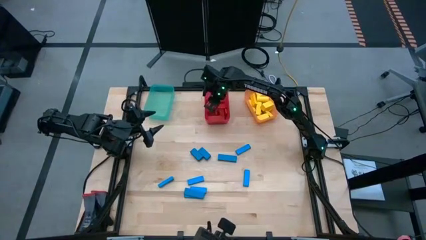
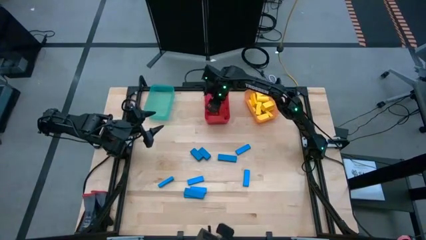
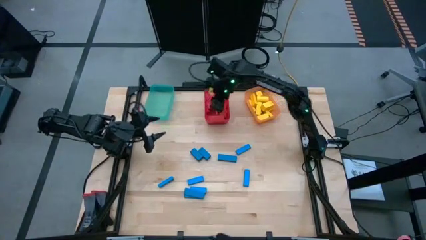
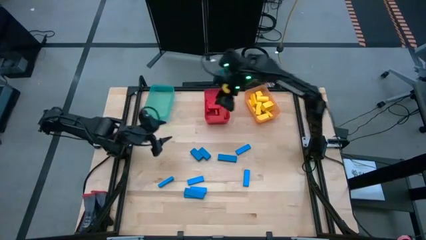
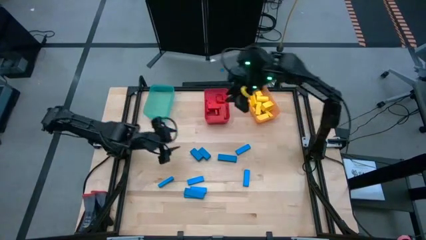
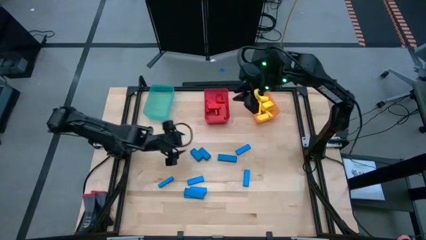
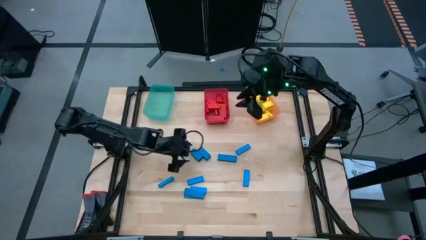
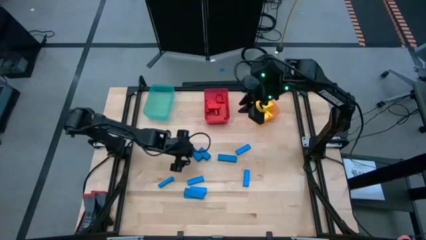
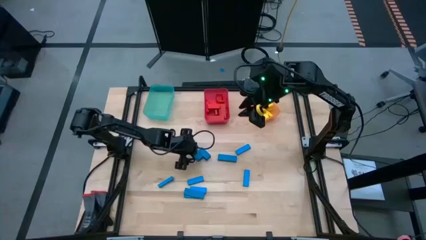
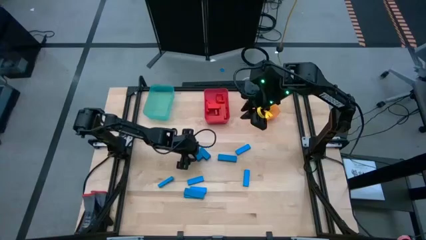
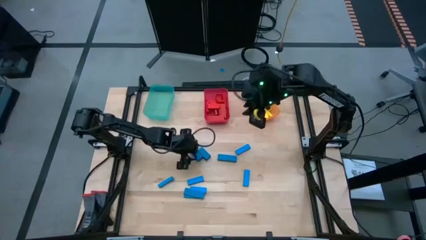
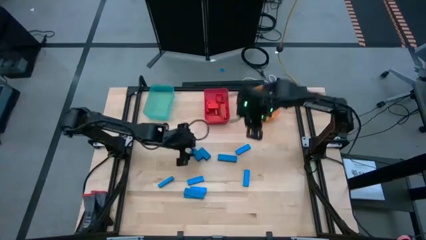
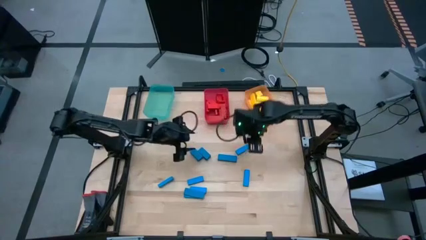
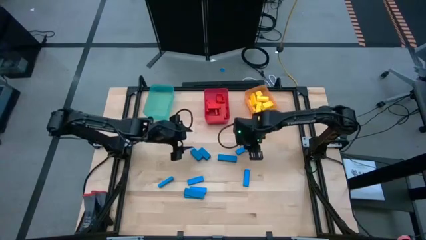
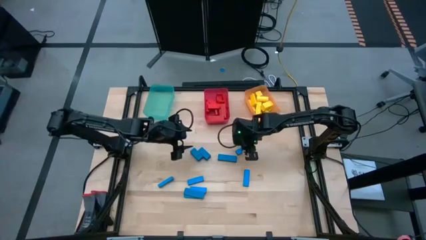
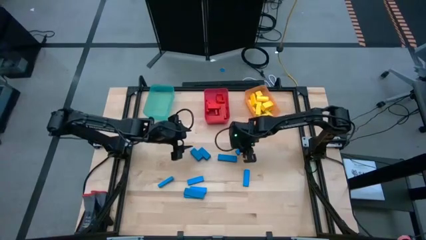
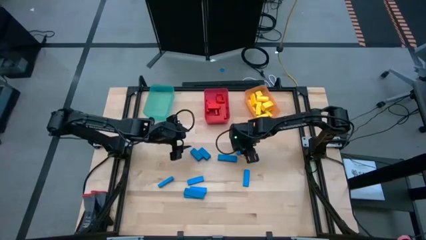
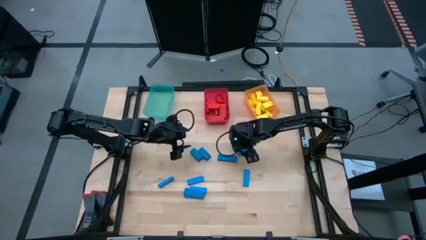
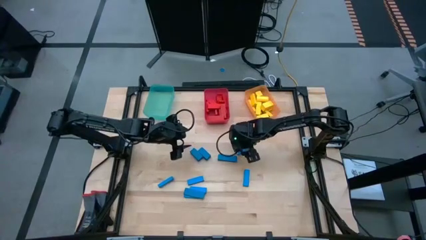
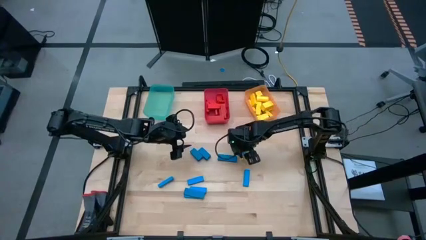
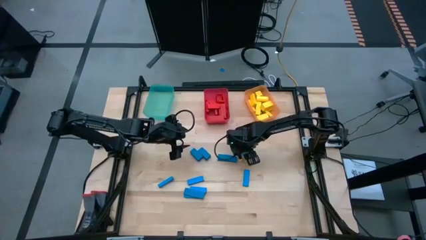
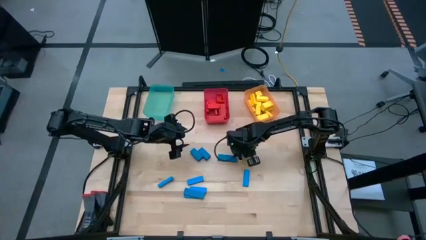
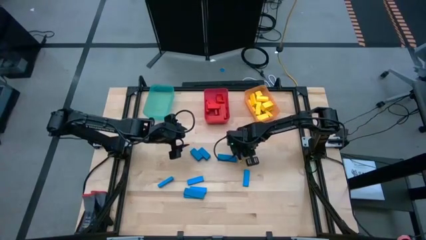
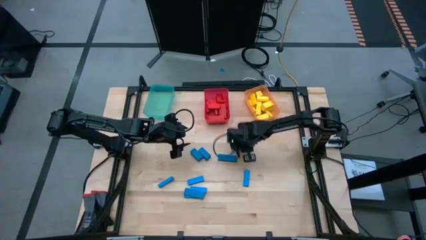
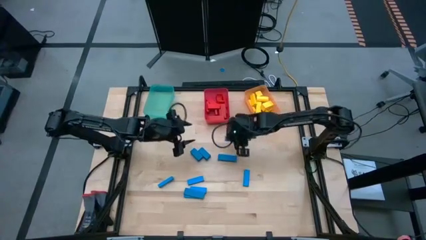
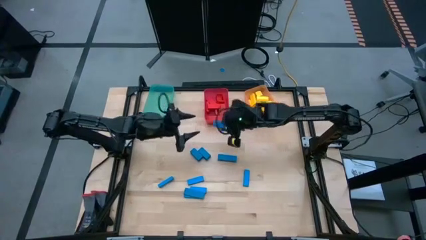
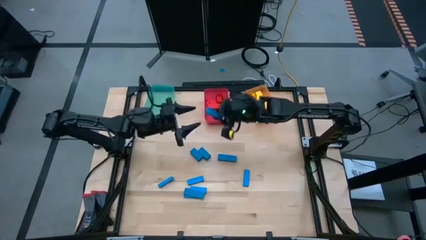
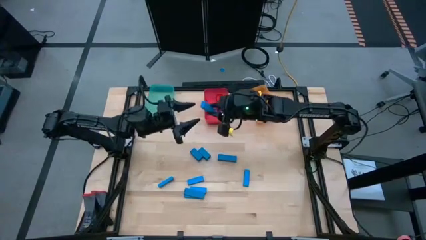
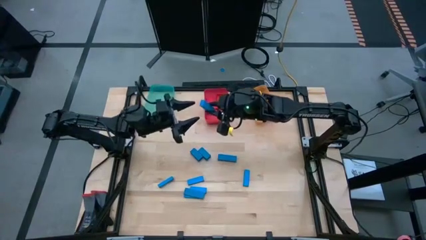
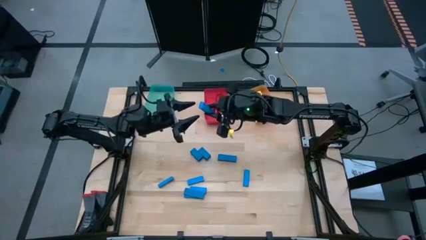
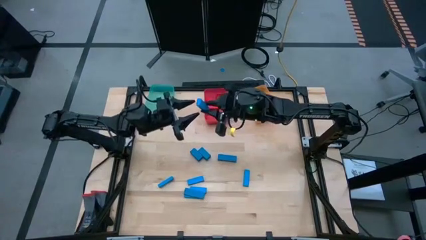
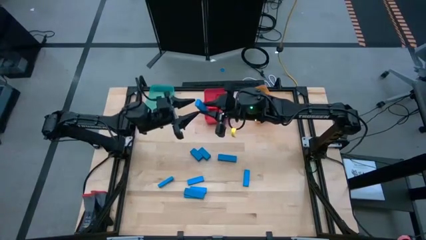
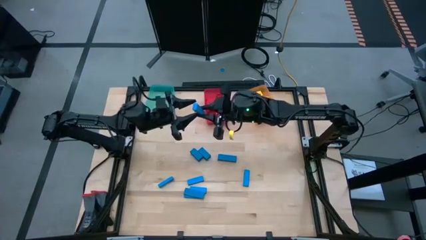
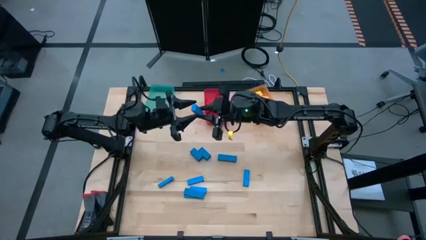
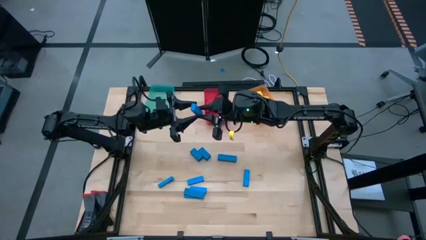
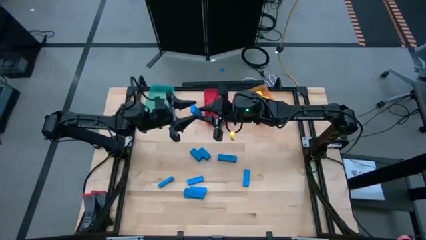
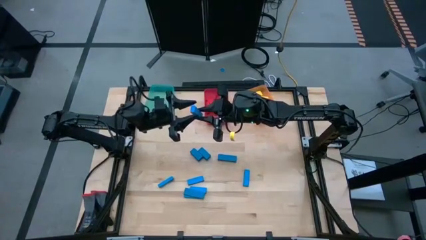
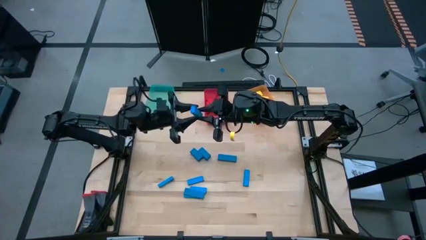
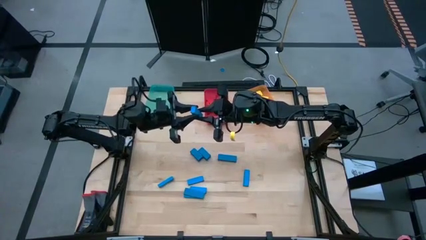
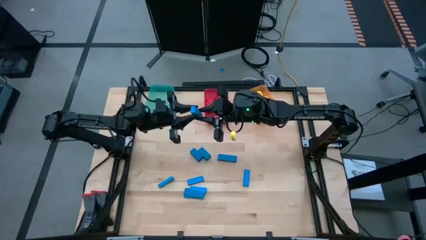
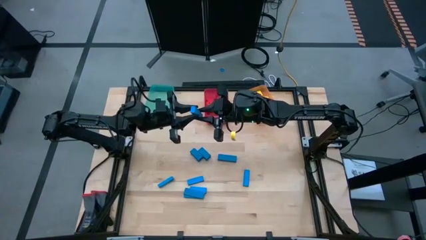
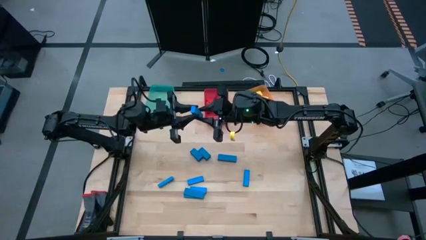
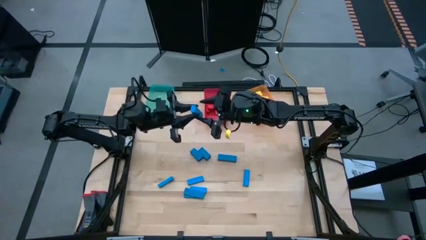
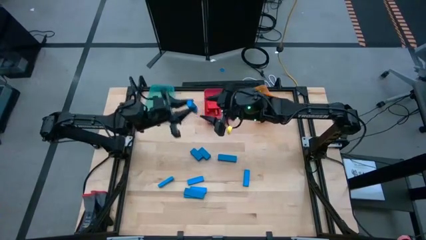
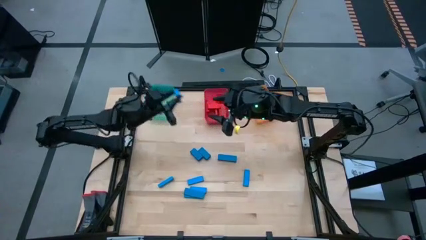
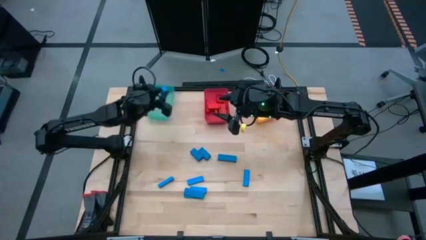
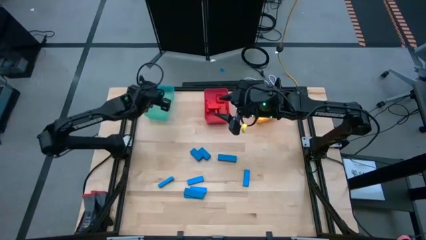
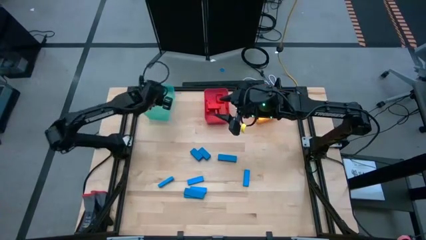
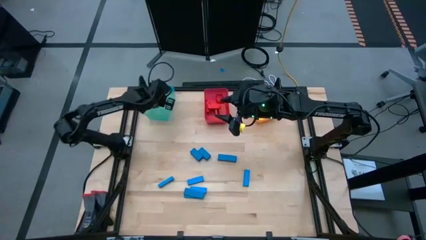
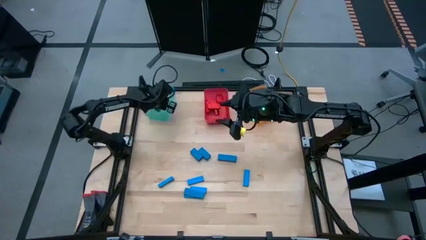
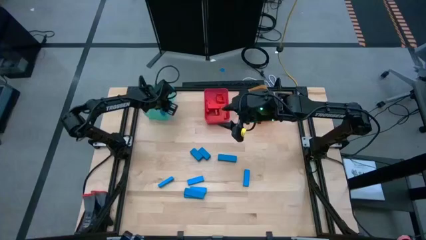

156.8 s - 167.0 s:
Task: Sort blocks
Put the blue block into the blue bin

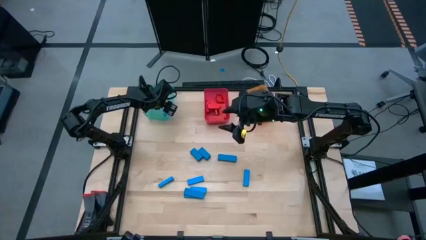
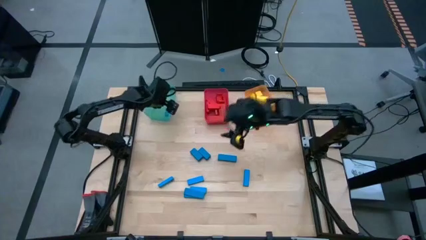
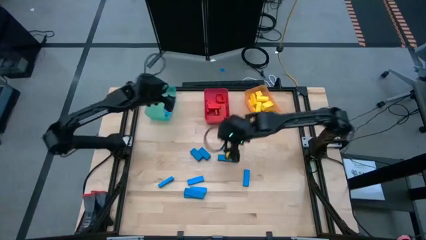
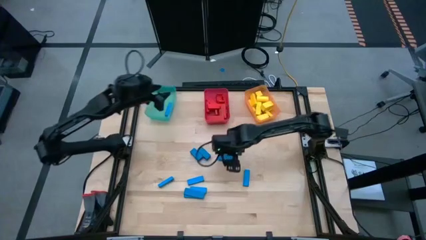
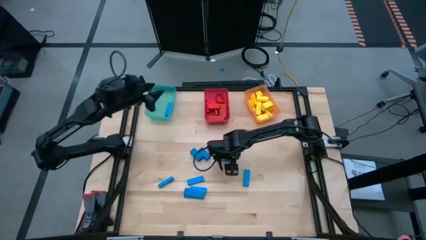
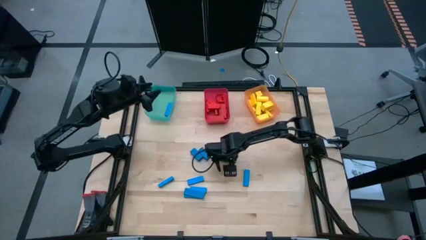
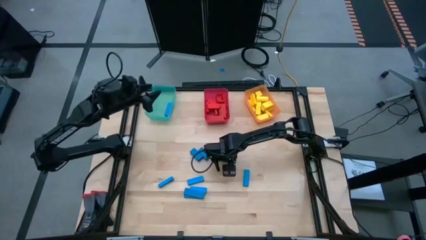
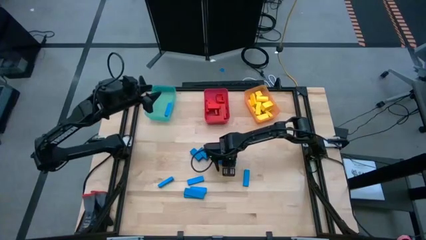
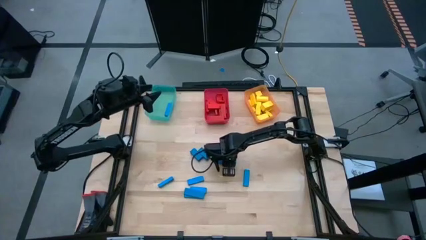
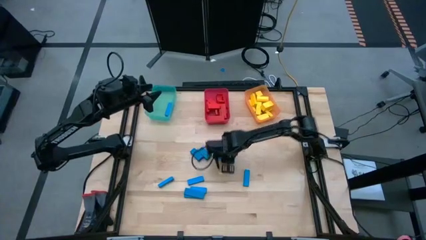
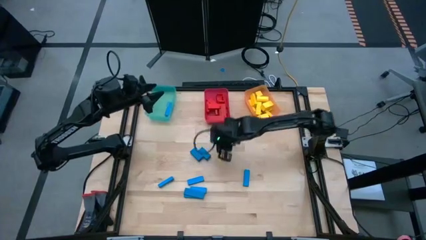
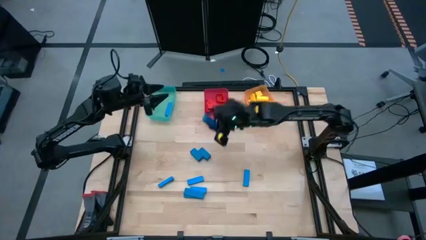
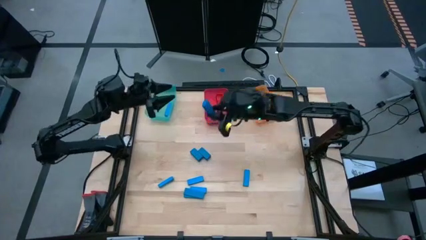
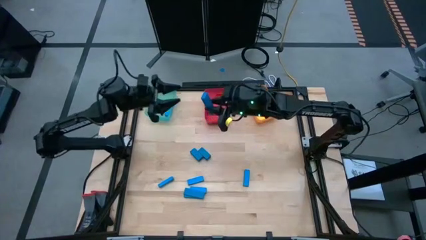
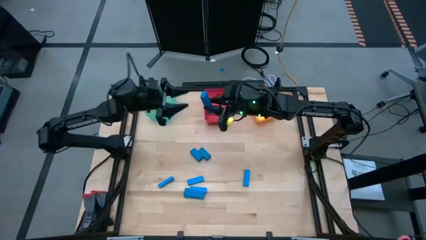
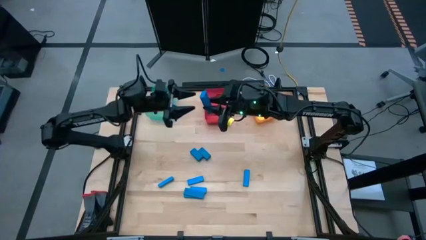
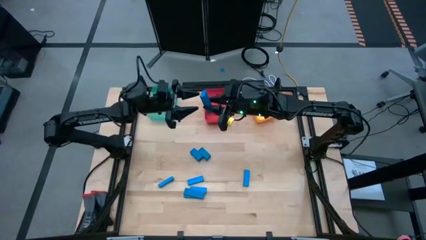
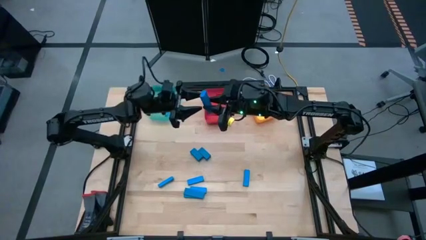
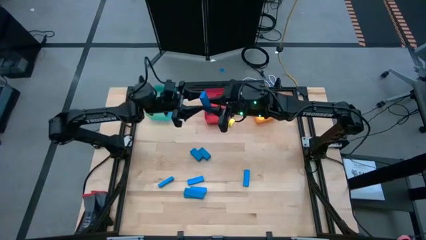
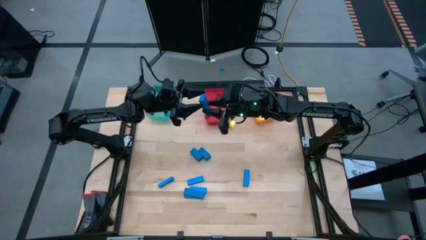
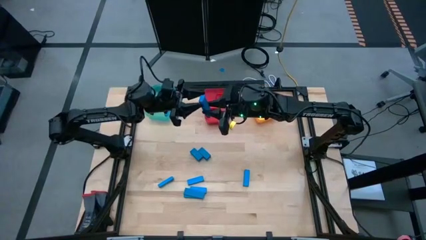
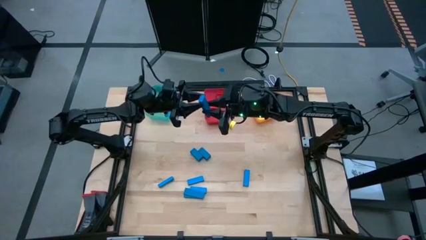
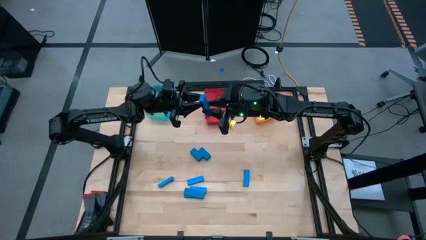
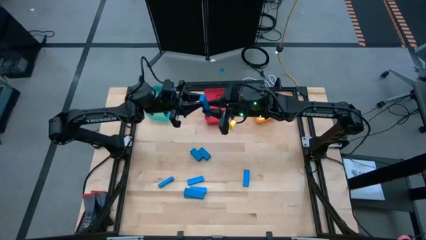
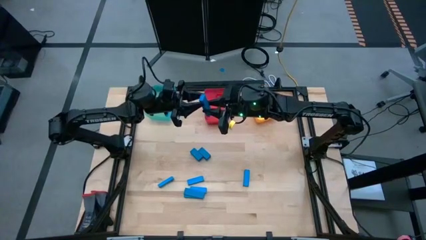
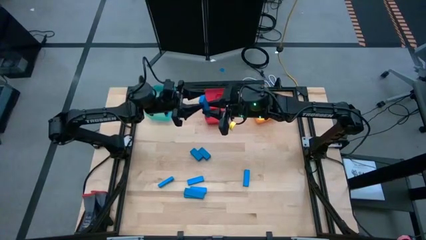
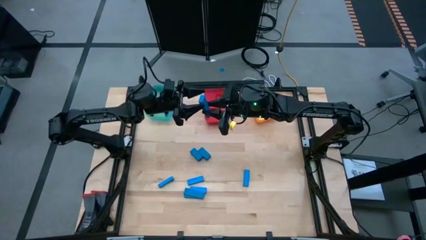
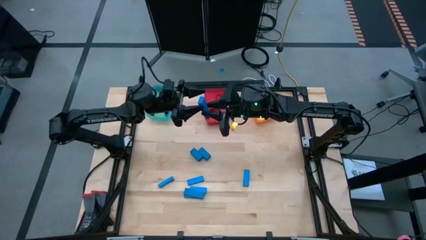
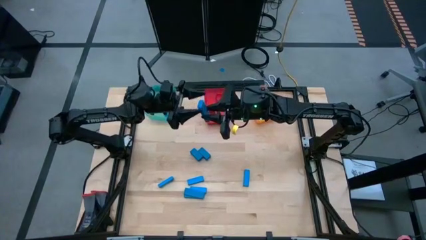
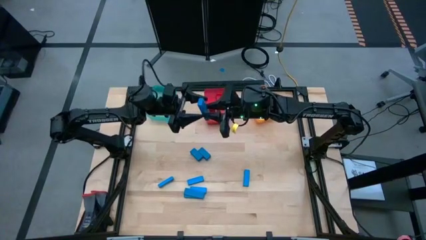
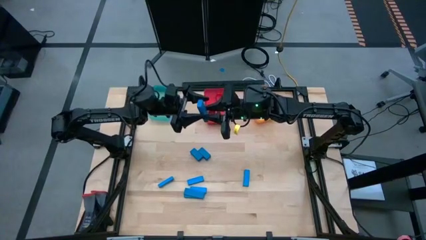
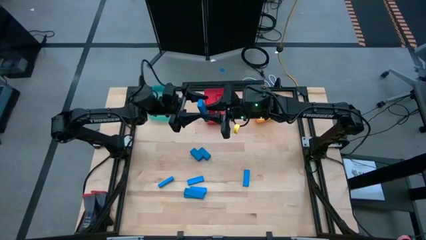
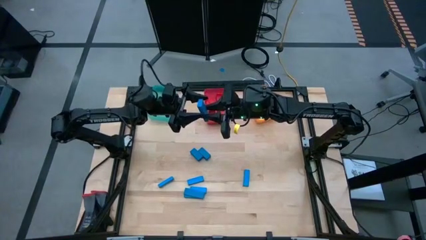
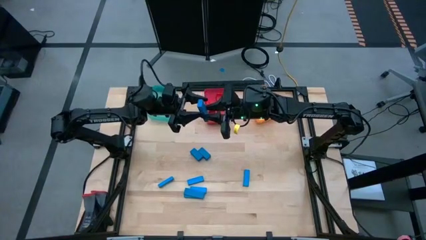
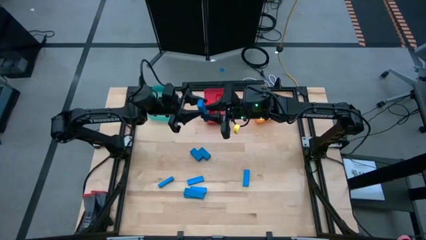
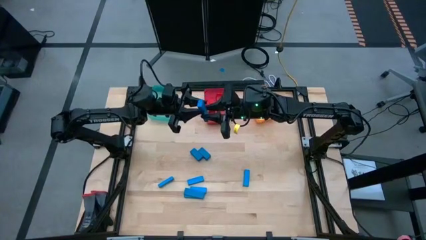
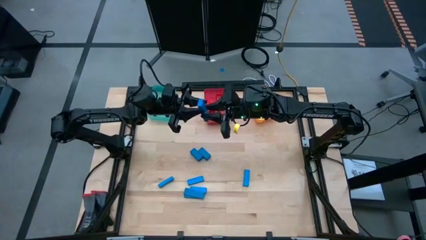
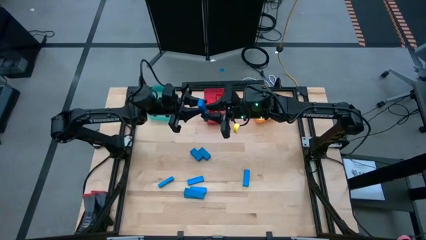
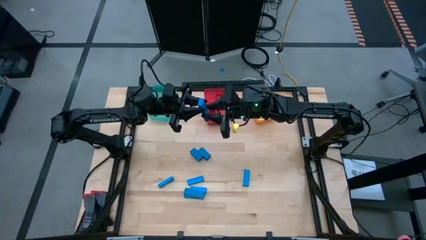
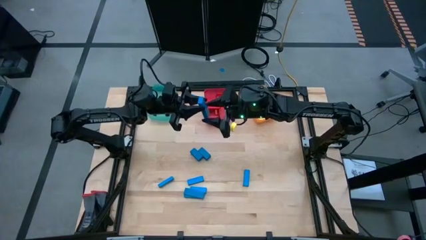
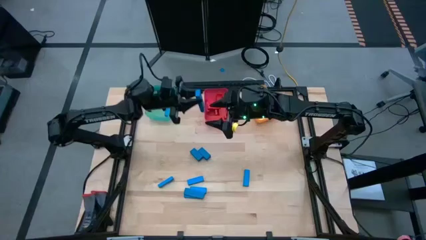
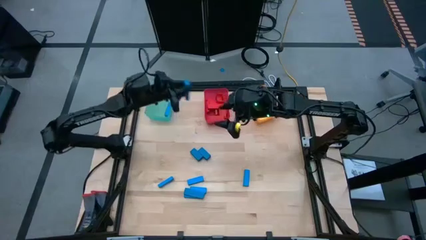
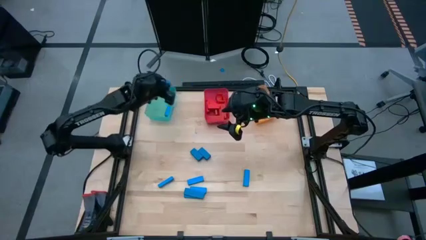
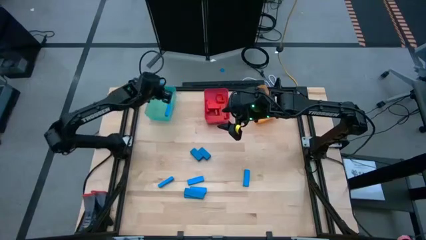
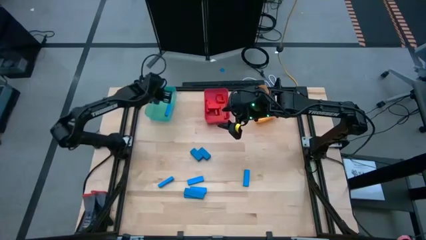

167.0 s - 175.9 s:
Put the blue block into the blue bin
